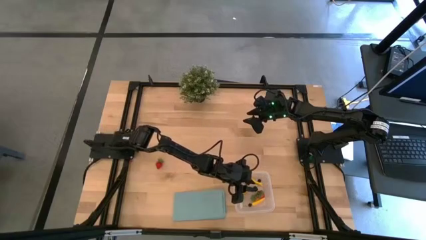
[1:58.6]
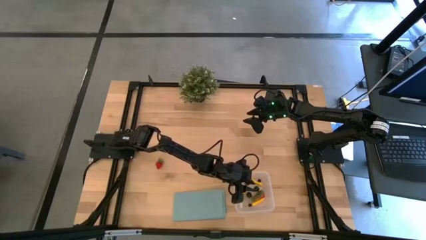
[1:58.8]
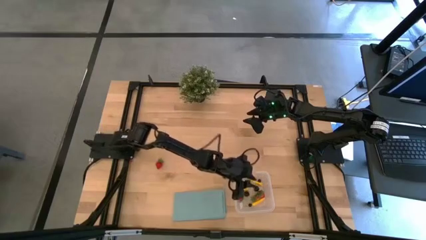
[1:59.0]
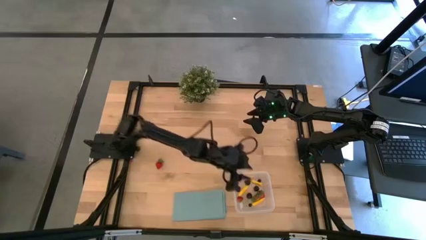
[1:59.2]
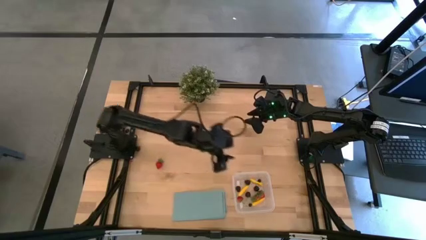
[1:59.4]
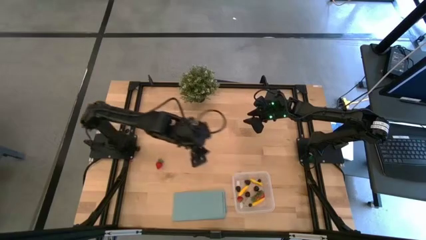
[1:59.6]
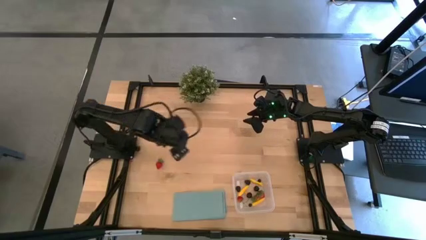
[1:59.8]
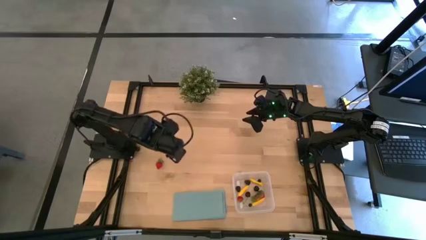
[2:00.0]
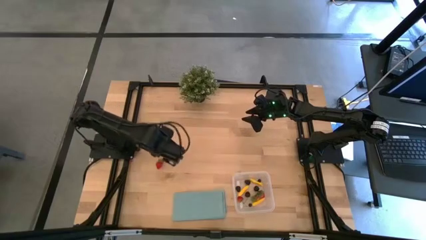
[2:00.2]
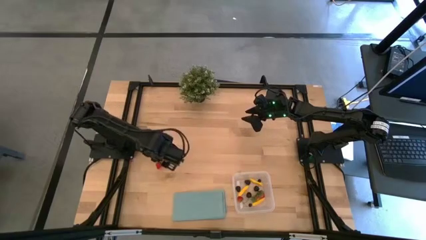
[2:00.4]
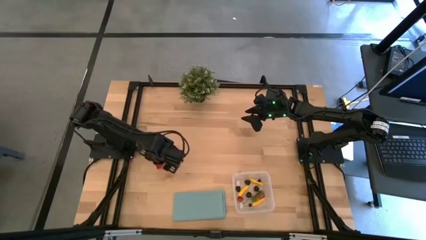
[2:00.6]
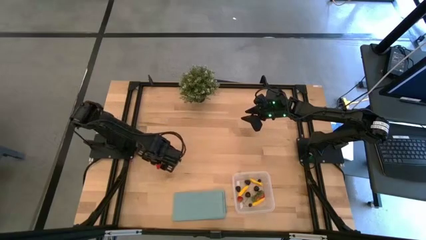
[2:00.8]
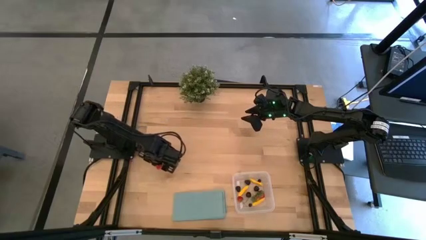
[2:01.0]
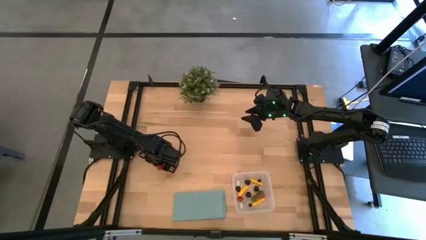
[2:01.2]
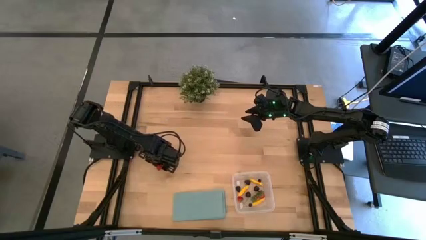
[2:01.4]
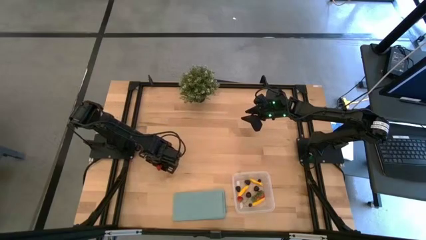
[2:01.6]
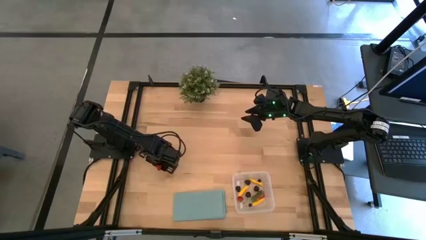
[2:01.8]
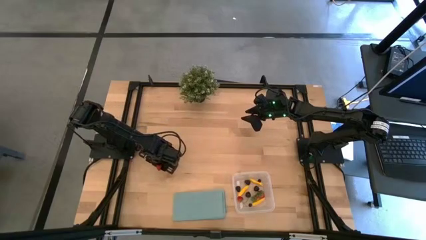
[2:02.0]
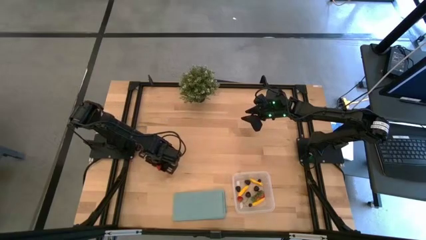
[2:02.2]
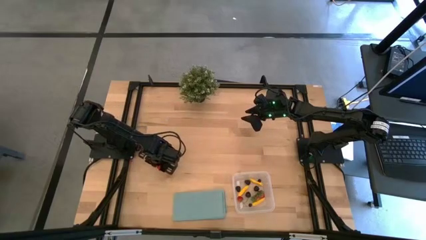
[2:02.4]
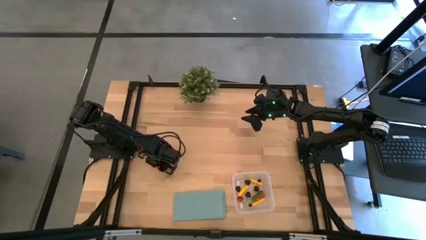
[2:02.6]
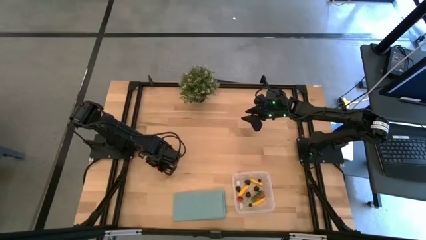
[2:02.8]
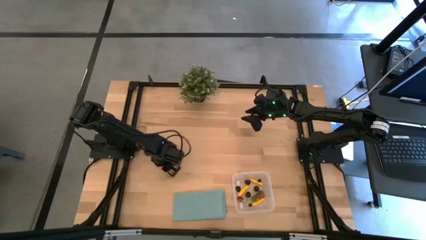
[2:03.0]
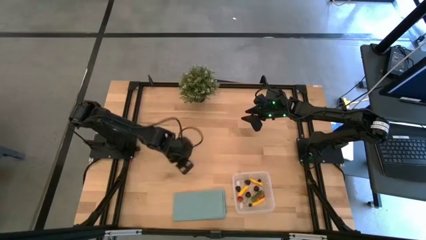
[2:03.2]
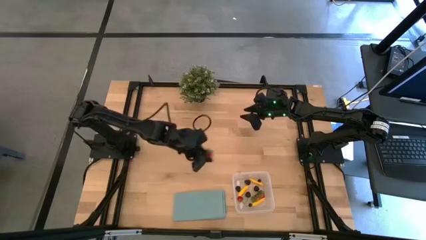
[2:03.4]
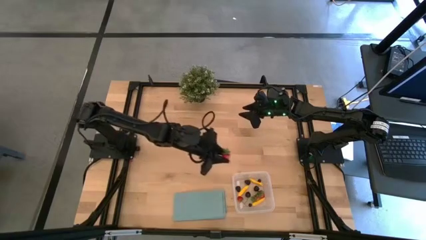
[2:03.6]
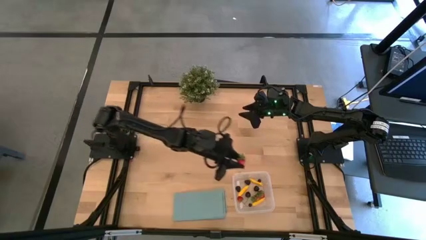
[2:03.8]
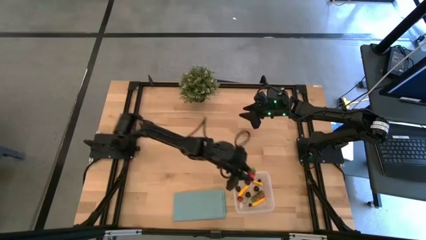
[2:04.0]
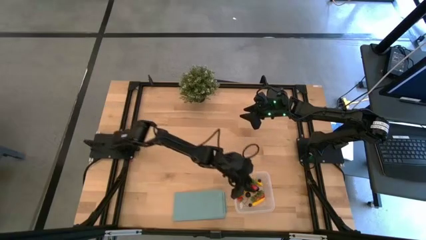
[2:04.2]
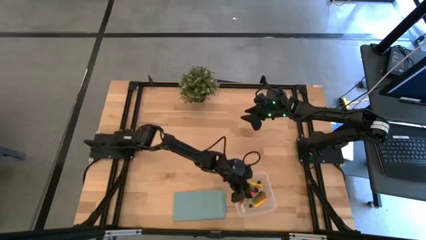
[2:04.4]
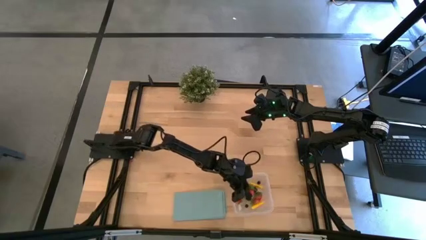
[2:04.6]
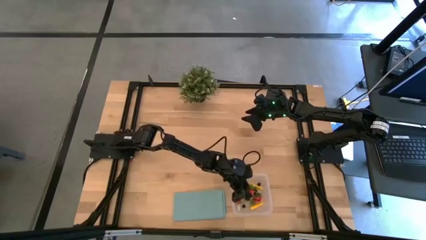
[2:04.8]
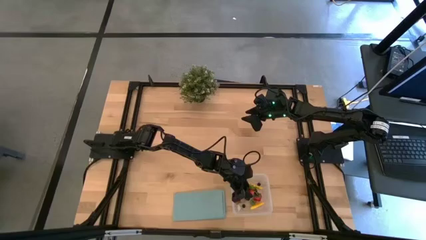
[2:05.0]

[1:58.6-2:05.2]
Task: Pick and placing Produce into tupperware
Put the red strawberry into the transparent bin

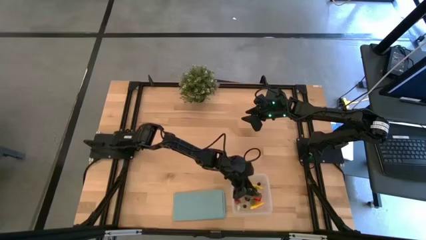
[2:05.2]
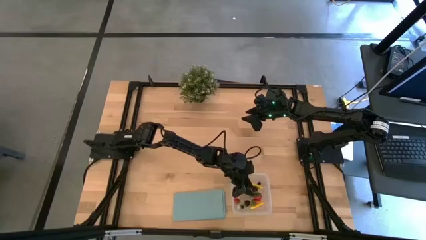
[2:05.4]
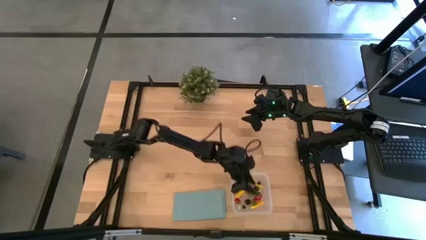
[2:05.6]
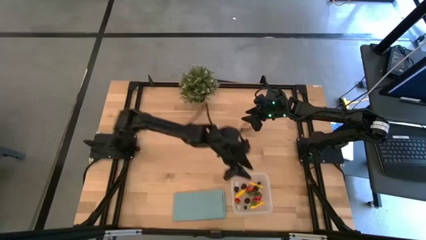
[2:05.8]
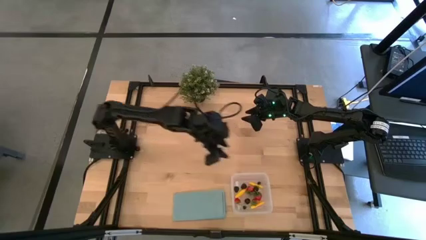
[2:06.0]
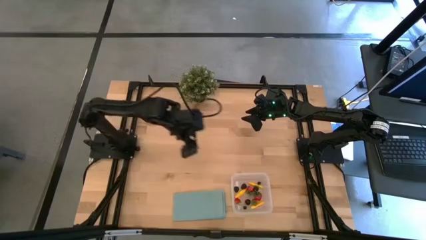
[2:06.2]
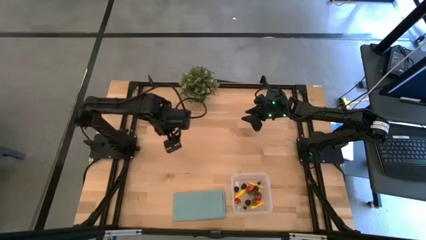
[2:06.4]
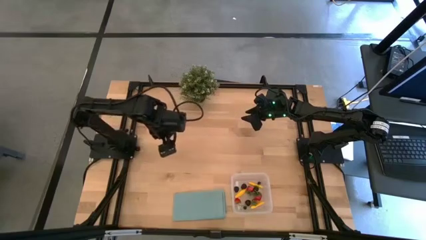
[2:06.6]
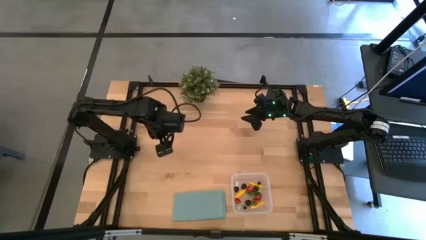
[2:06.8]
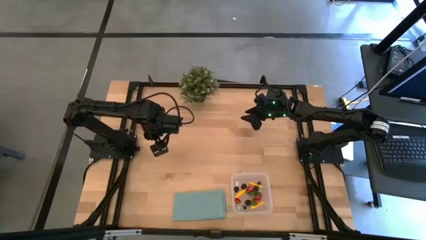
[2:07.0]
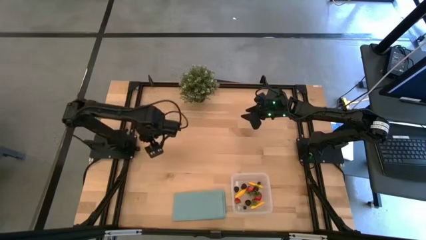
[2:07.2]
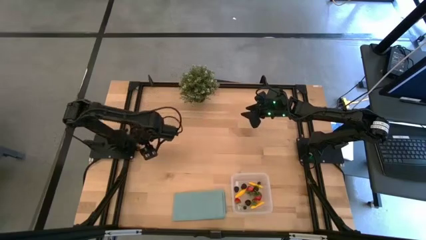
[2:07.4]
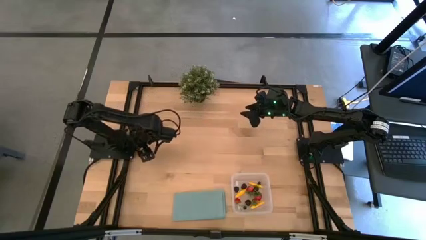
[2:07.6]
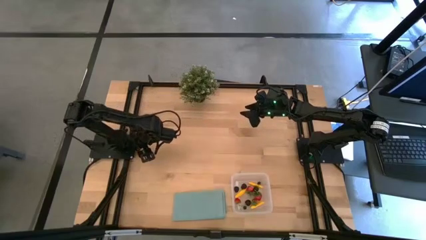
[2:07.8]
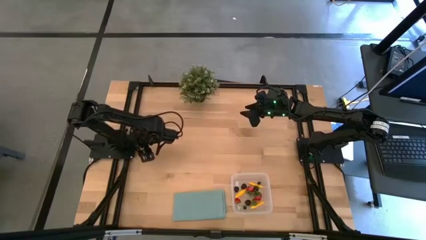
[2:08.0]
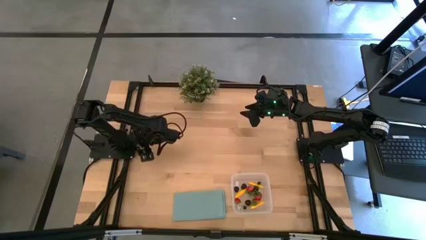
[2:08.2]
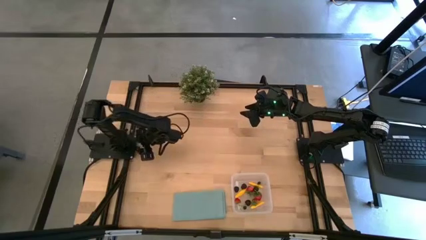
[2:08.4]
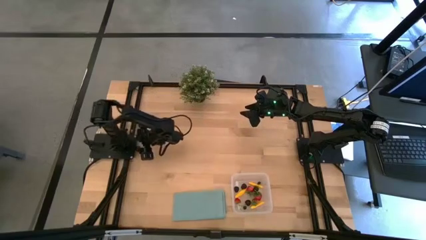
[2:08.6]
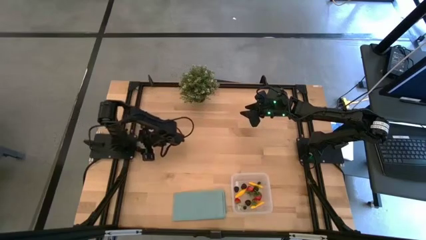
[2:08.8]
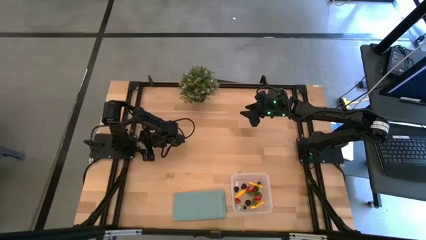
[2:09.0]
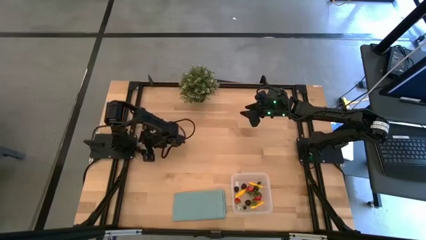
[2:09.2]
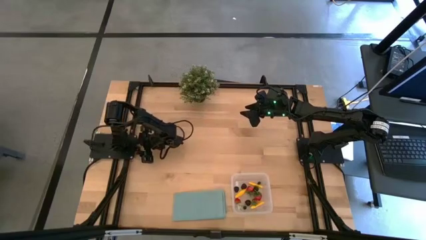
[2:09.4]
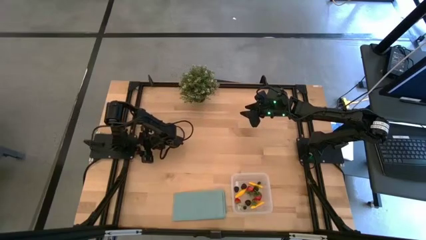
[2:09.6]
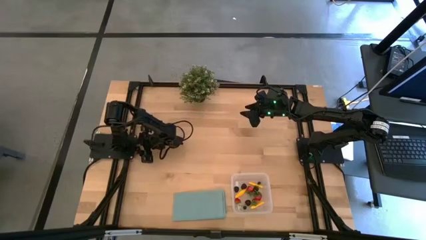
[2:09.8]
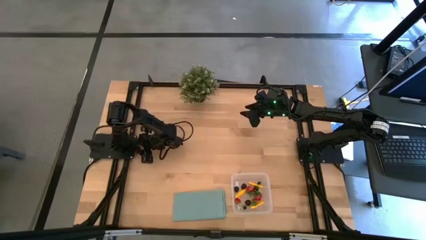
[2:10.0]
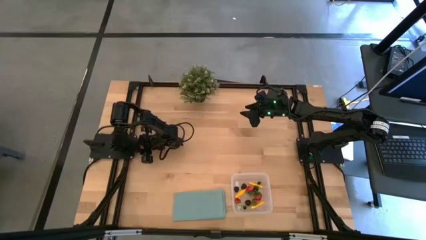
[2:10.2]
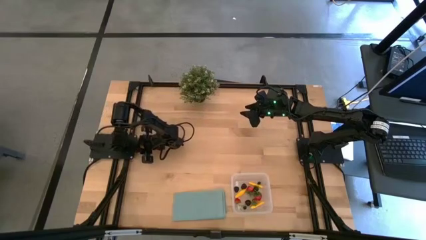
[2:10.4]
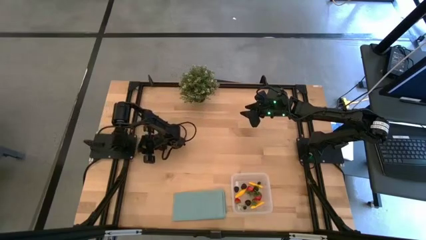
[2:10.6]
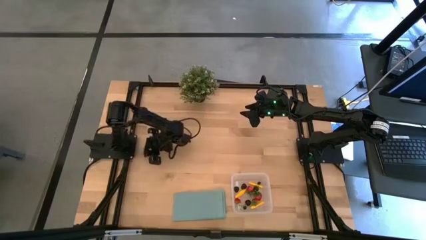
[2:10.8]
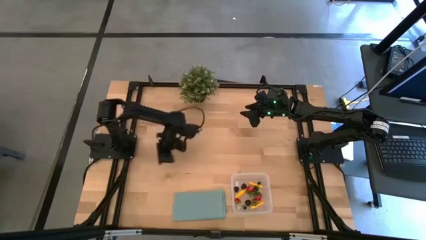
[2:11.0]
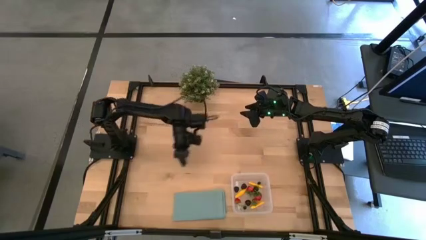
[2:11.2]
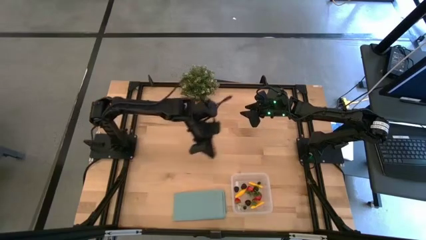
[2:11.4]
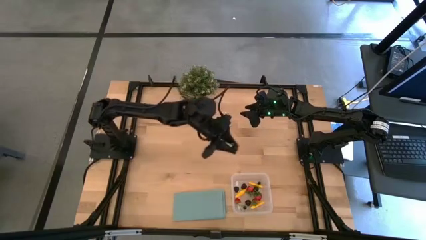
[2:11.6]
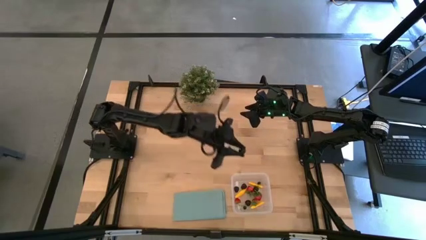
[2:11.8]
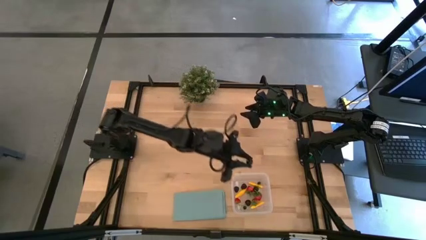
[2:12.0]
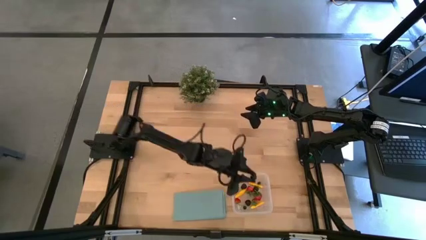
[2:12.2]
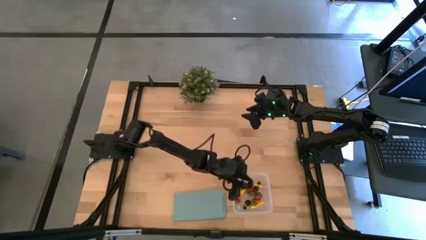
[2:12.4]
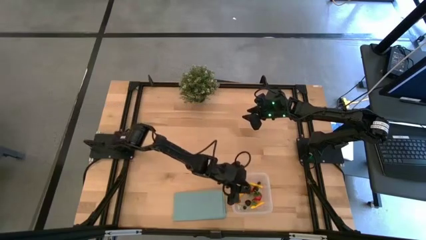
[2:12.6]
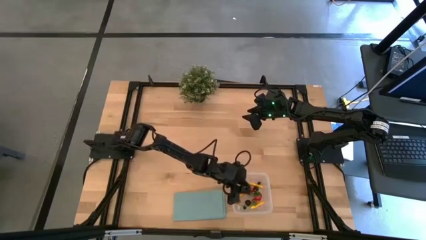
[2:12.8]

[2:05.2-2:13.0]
Put the black cherry into the transparent bin
